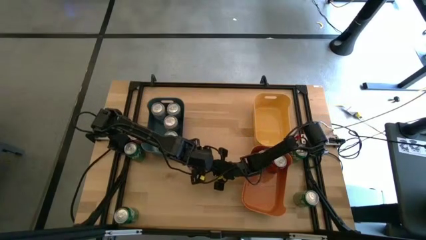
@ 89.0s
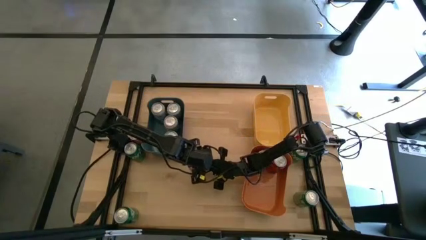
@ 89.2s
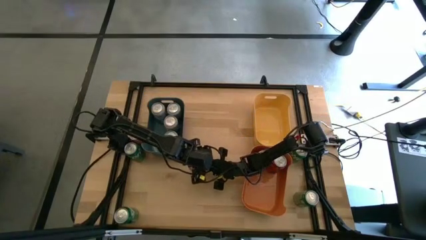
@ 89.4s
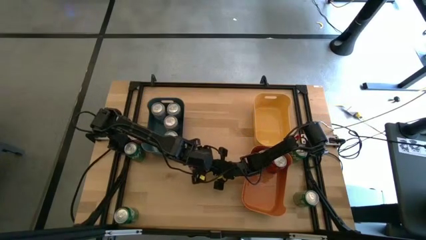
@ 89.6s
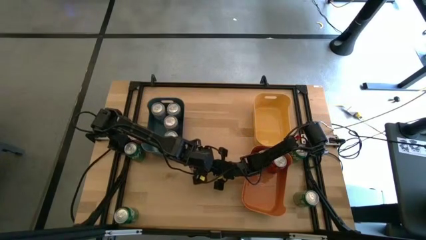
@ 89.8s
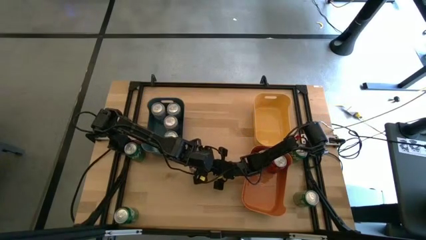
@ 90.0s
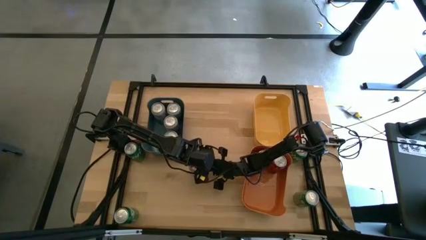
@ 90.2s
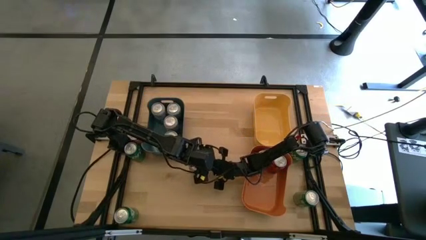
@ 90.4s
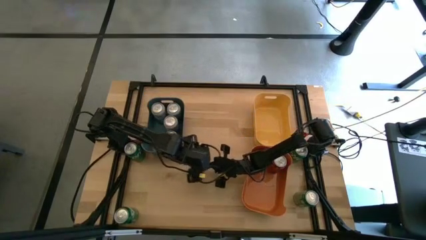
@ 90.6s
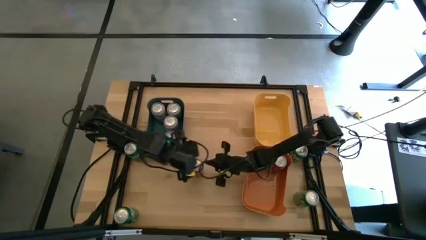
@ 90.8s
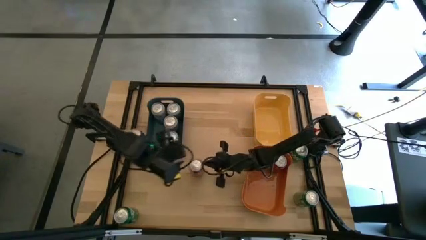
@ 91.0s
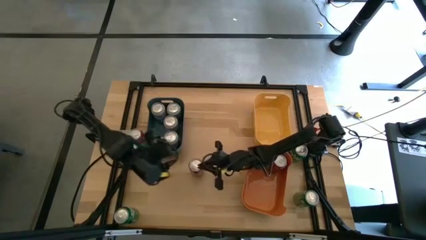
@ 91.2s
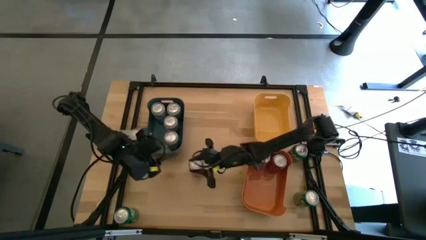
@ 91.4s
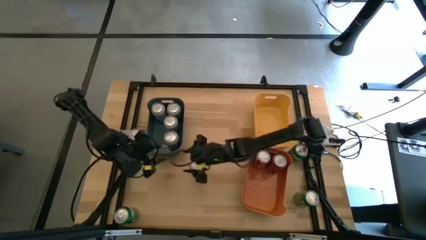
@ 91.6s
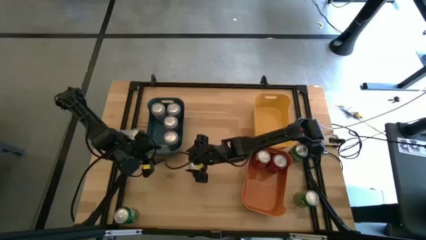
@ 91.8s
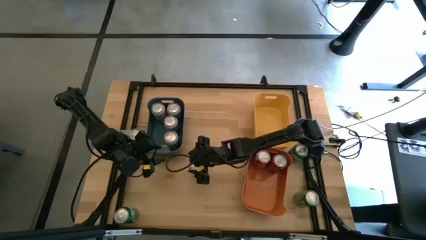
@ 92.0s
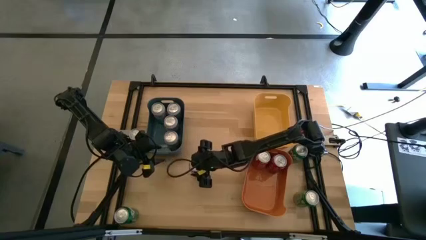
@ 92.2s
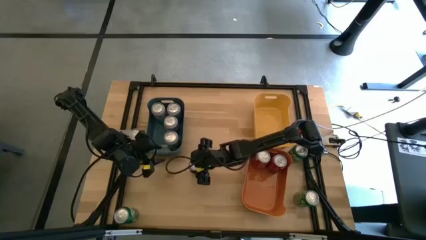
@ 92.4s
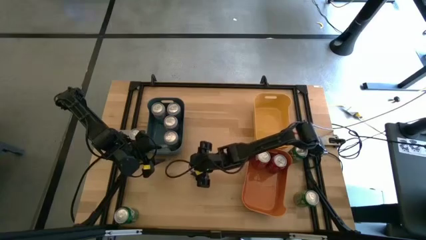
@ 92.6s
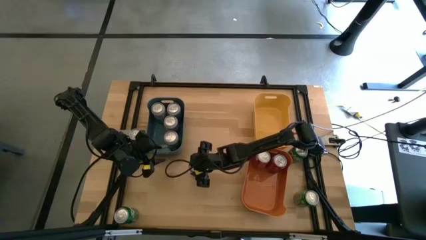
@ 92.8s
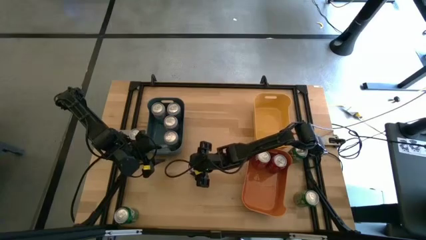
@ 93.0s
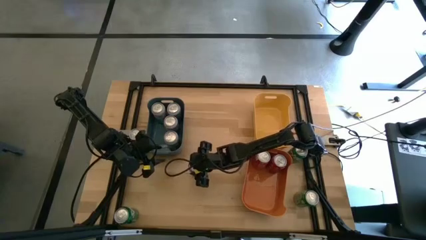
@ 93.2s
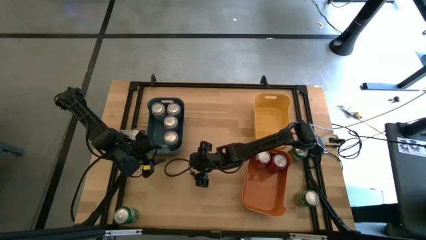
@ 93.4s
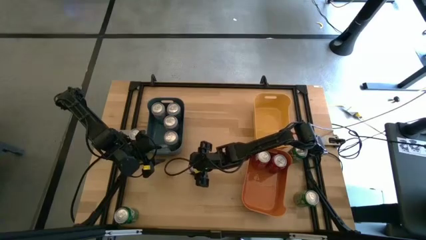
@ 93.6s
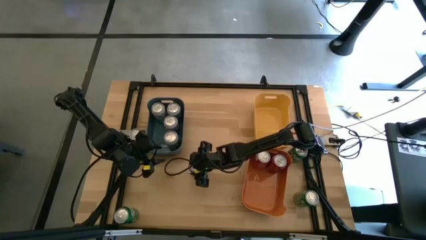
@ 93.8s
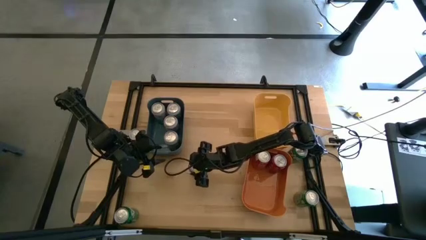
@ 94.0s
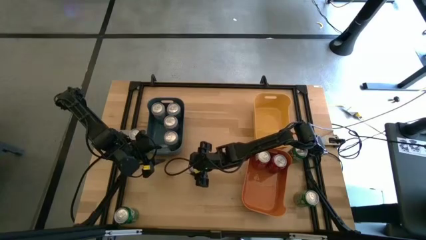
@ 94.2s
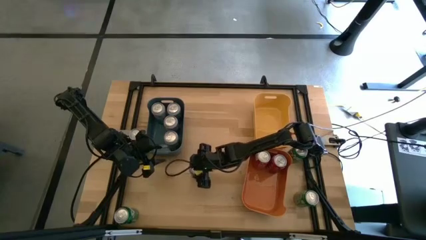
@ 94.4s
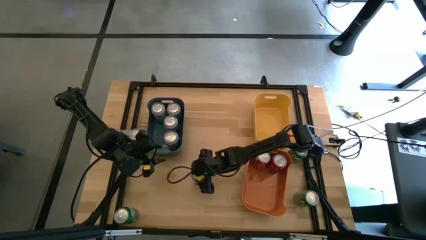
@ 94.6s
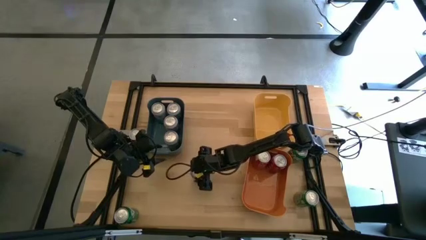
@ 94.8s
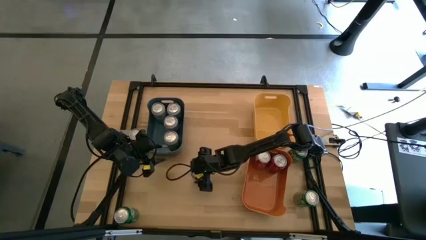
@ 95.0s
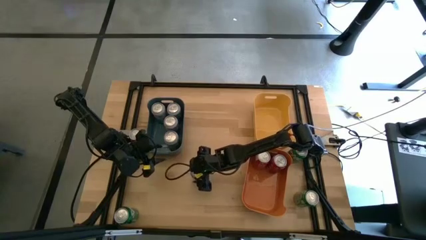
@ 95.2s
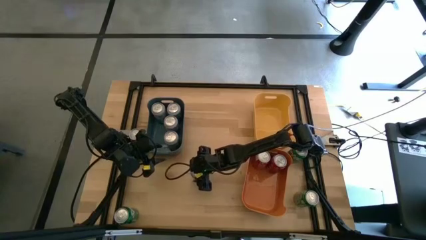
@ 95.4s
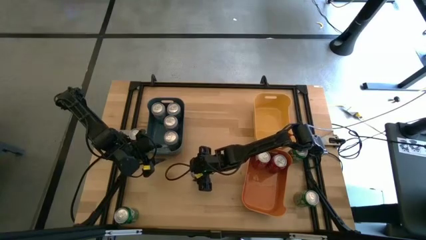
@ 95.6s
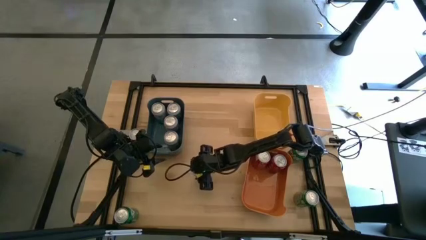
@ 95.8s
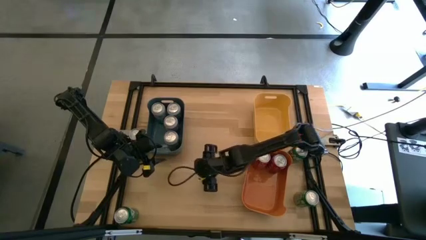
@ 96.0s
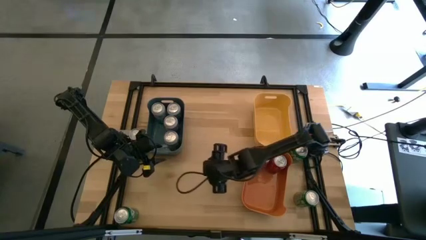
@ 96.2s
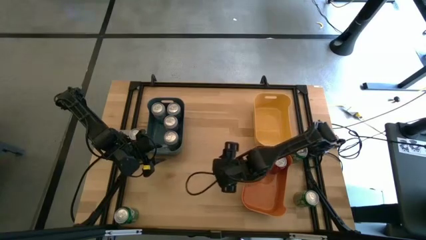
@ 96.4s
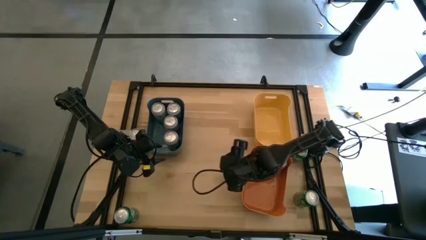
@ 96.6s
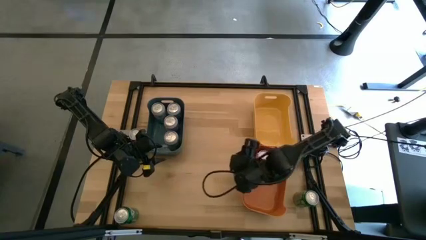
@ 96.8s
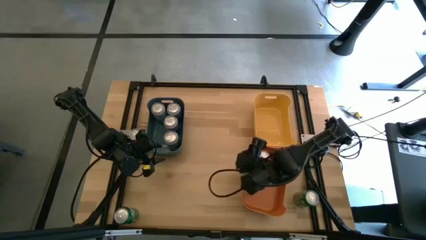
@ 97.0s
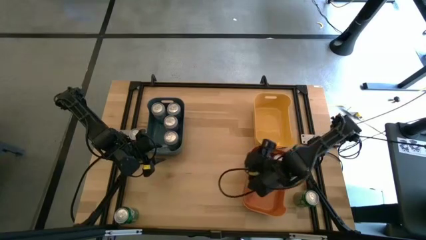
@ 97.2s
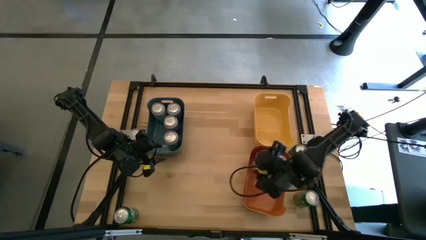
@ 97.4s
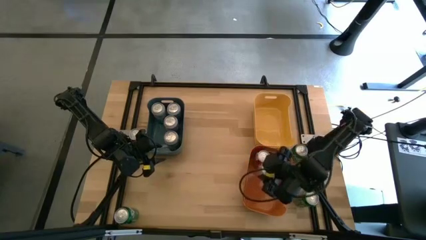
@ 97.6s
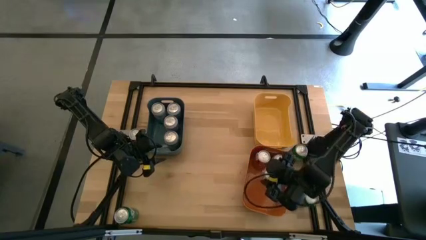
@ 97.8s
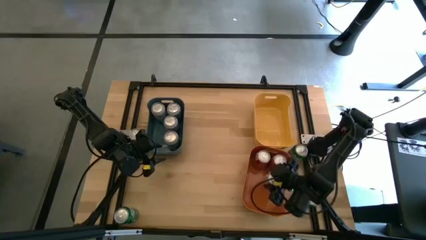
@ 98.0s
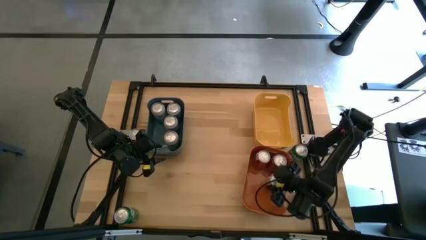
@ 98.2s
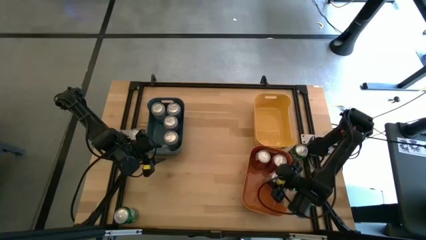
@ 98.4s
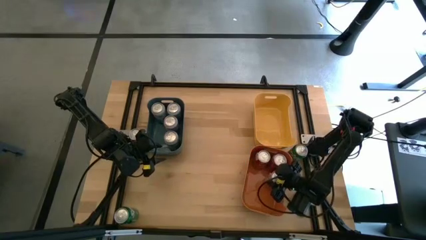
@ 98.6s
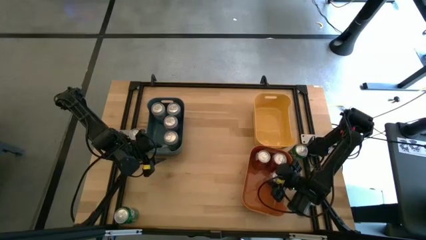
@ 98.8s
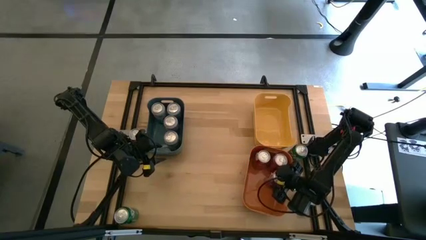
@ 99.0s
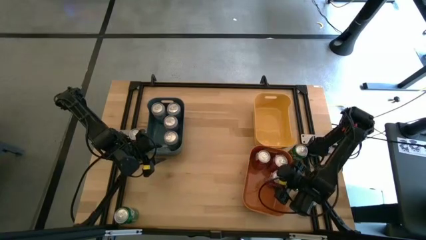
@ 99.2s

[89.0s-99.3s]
Task: Sort soda cans
Put the top red soda can into the orange bin

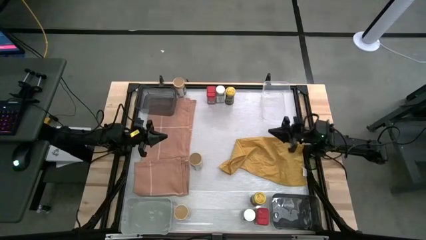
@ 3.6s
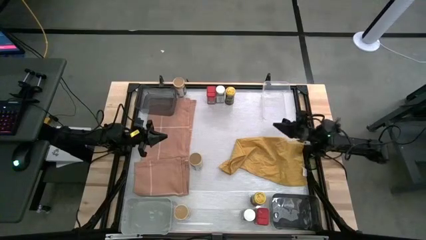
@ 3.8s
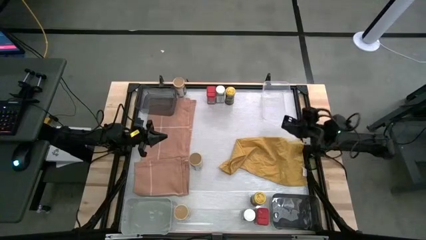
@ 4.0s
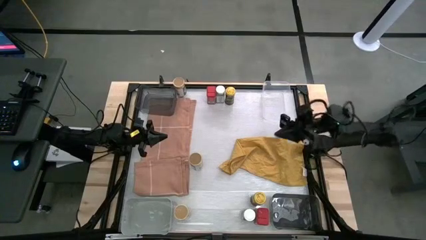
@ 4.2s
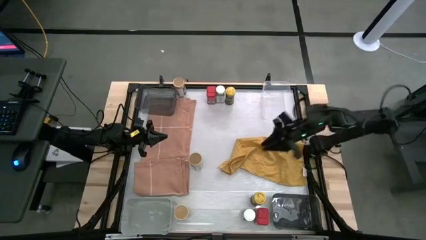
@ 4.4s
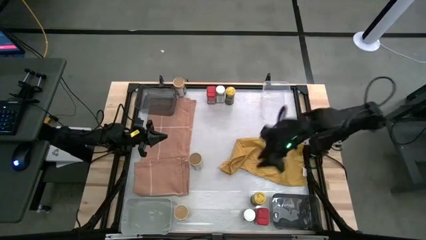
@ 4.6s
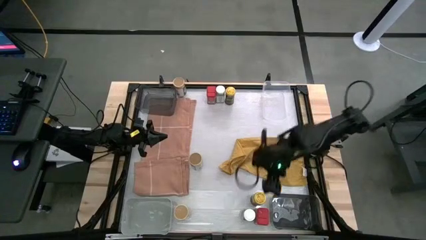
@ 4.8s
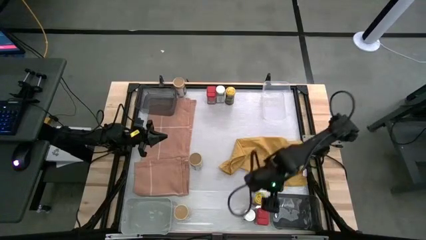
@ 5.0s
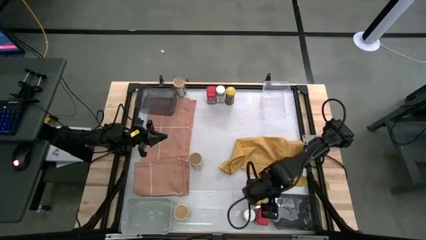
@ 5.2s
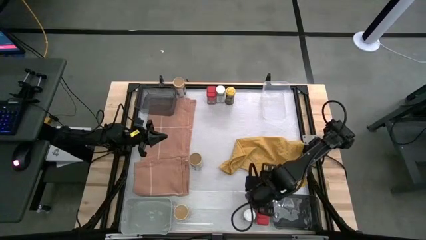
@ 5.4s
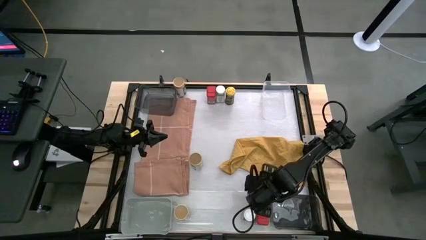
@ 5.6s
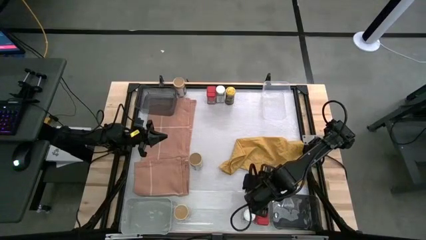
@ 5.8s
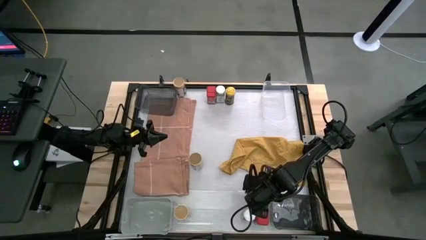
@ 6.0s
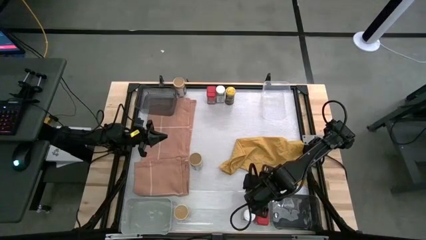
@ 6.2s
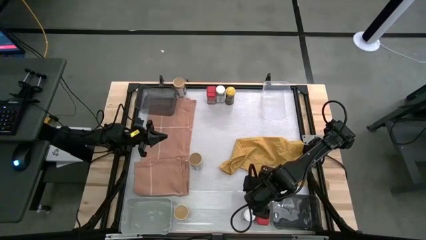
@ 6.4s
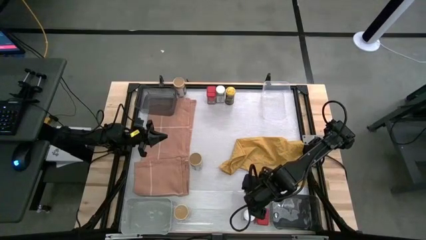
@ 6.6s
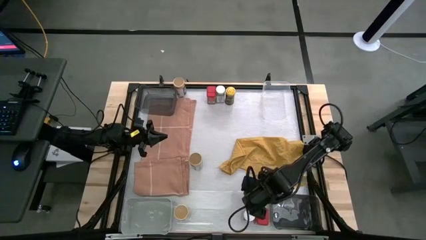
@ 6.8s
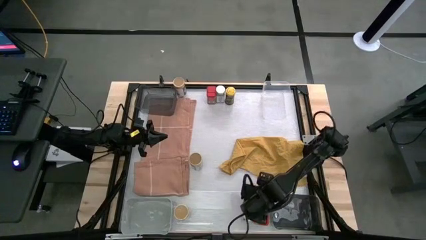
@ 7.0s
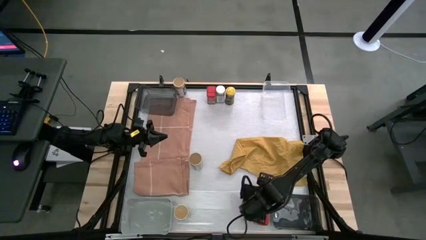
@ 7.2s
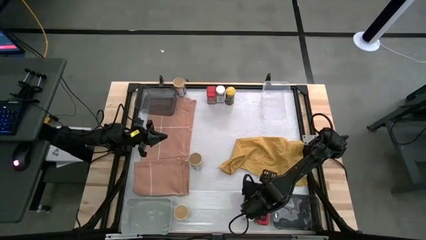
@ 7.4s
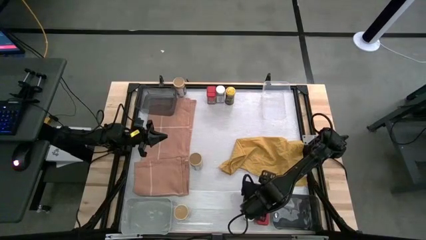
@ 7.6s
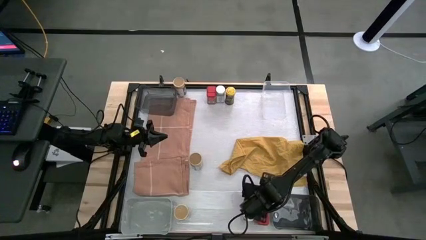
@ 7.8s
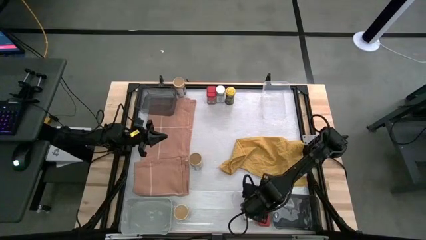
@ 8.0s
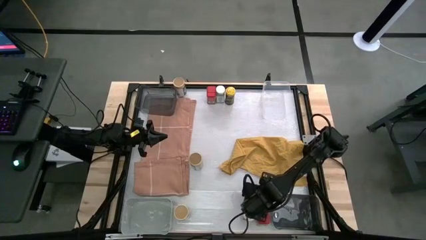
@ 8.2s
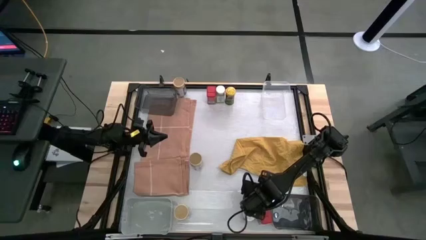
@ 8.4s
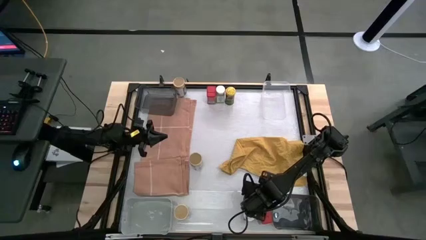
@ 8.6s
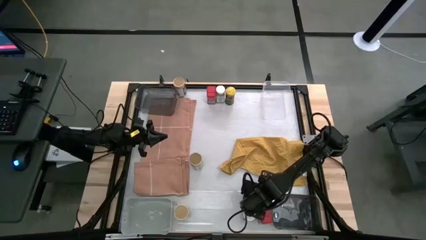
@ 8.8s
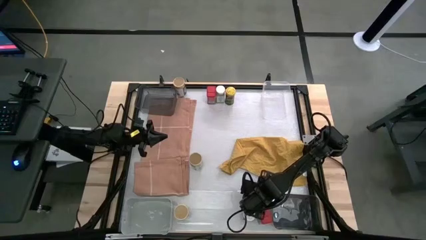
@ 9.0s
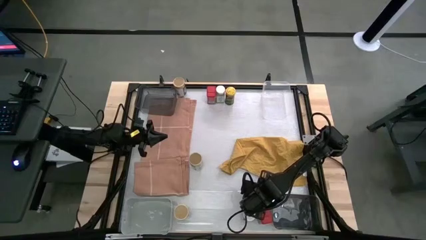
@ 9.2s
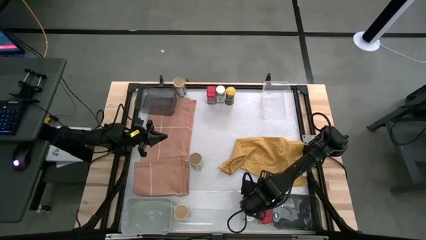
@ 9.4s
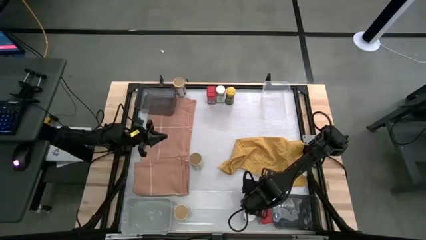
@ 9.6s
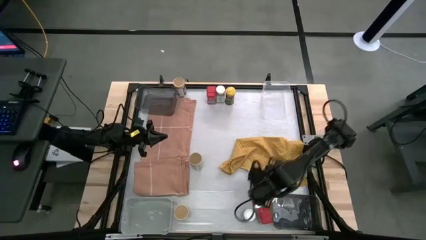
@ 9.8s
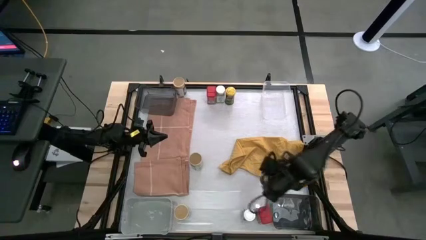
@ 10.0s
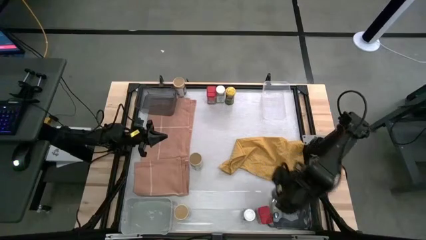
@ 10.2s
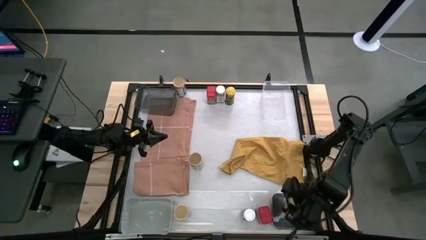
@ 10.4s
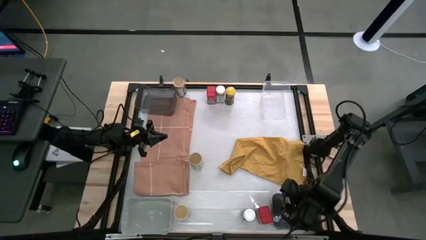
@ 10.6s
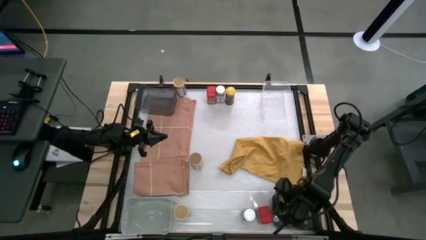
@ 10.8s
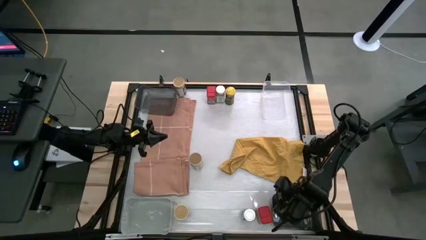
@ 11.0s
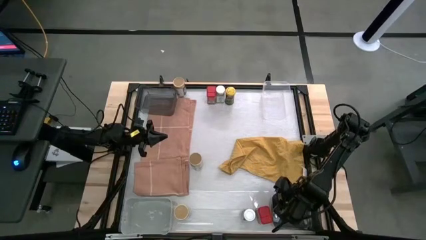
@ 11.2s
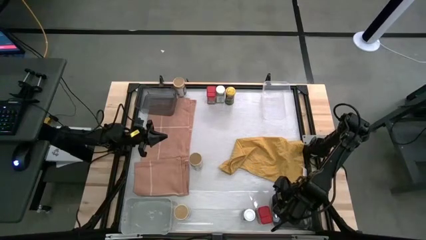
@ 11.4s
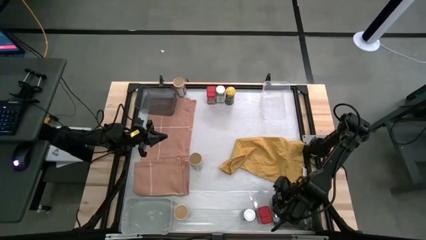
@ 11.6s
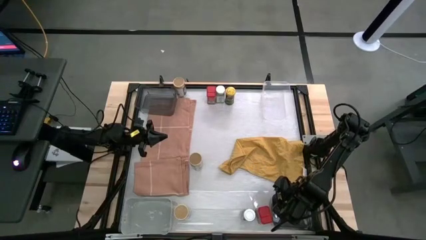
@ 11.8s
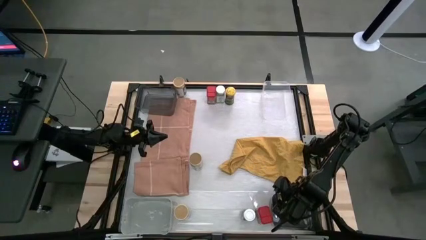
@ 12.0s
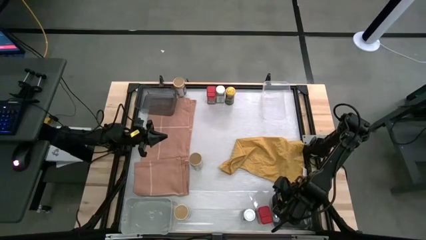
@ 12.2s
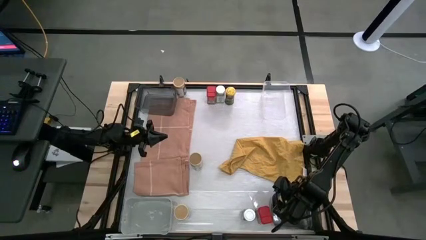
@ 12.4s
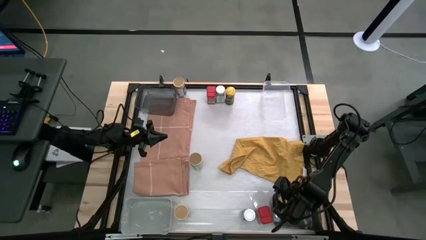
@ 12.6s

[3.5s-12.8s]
Task: Sort spices by type
Put the bottom yellow seasoning bottle into the bottom black bin
